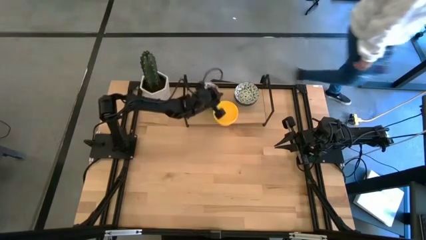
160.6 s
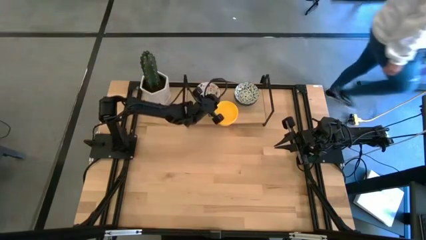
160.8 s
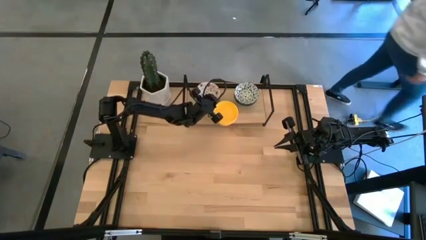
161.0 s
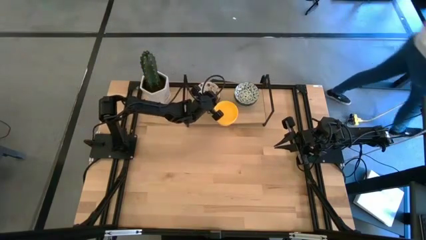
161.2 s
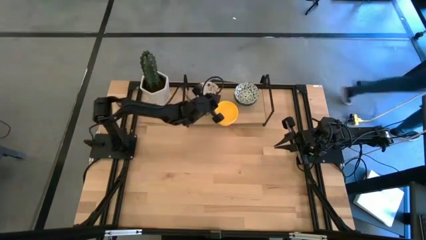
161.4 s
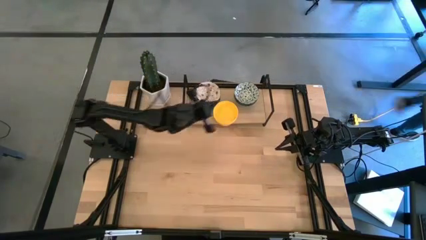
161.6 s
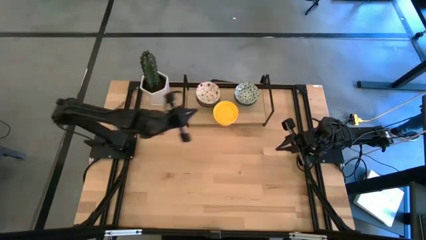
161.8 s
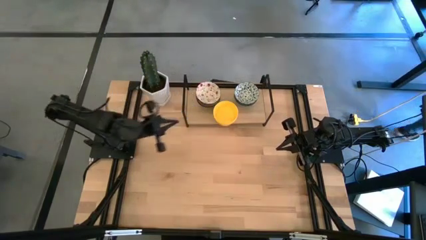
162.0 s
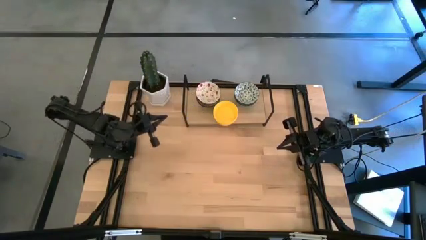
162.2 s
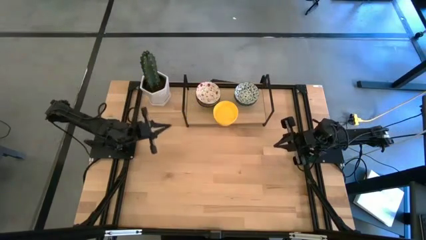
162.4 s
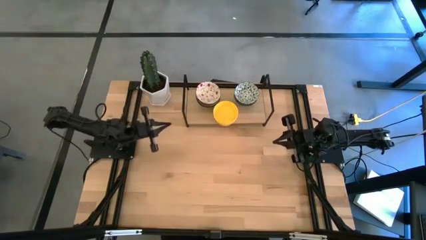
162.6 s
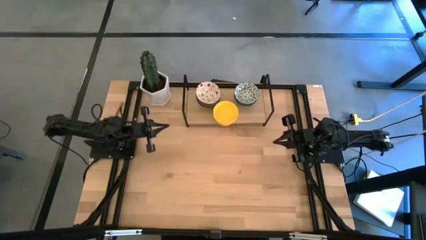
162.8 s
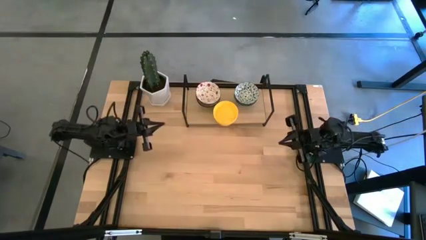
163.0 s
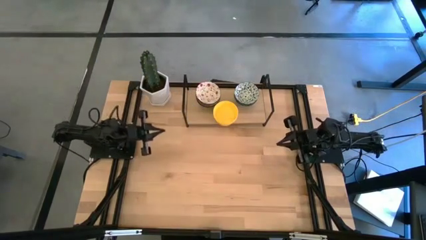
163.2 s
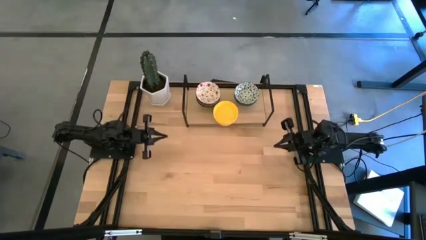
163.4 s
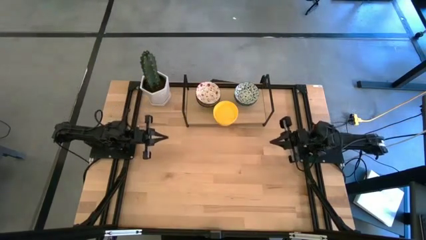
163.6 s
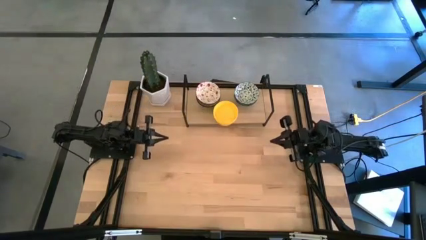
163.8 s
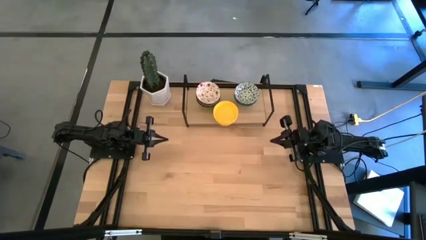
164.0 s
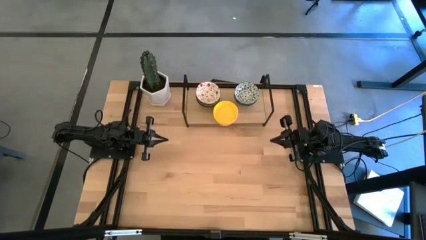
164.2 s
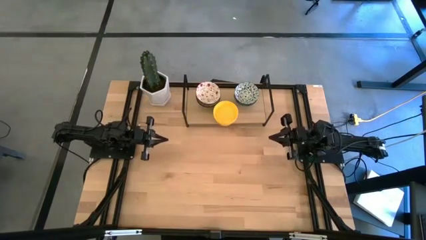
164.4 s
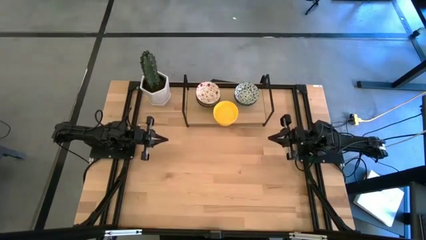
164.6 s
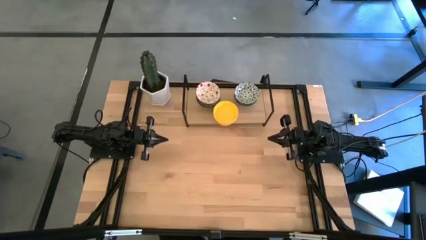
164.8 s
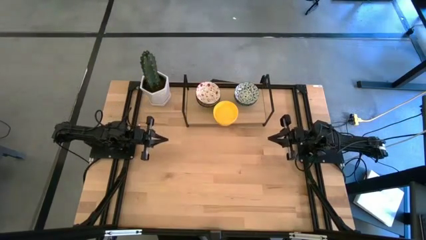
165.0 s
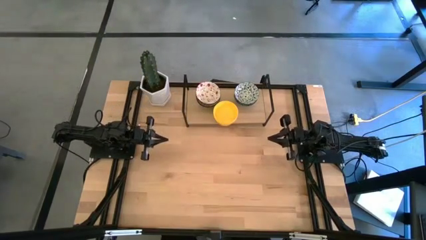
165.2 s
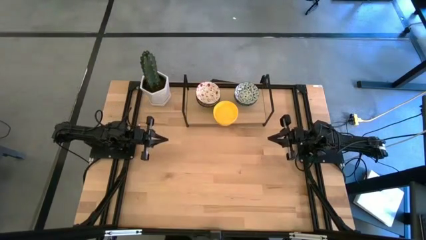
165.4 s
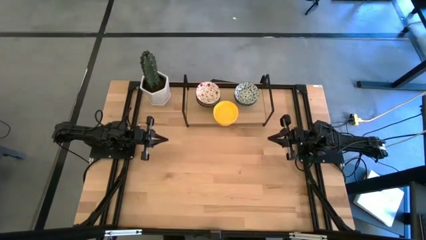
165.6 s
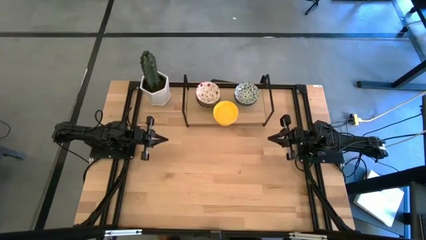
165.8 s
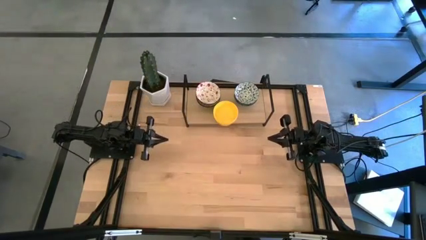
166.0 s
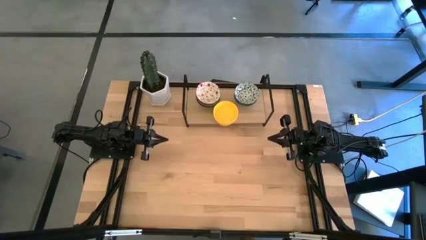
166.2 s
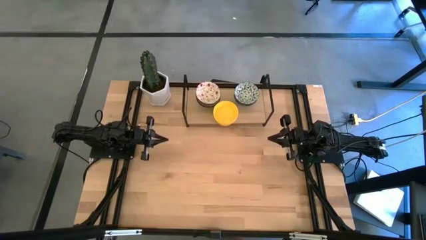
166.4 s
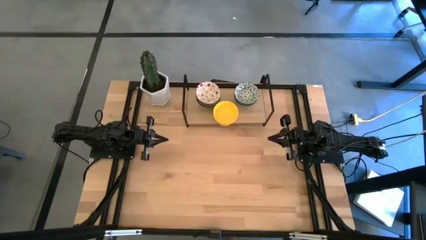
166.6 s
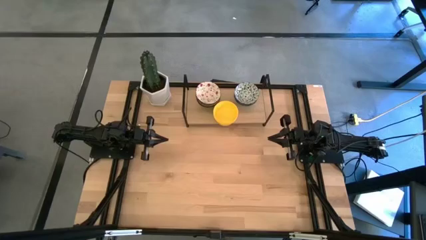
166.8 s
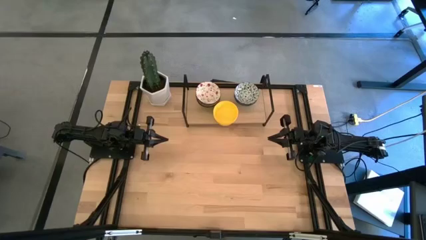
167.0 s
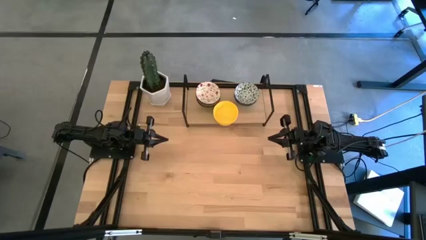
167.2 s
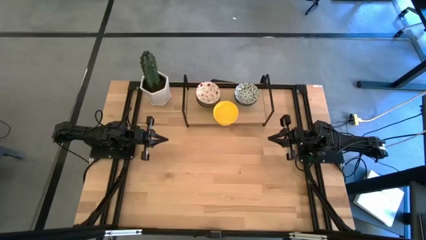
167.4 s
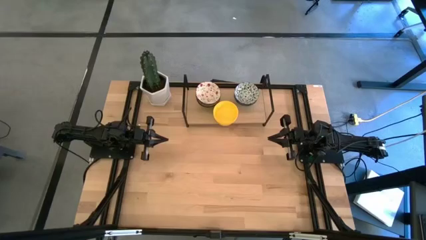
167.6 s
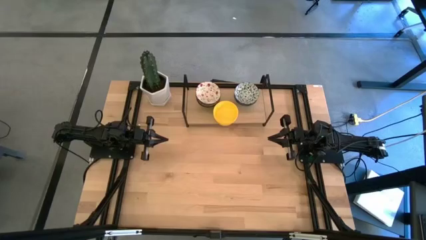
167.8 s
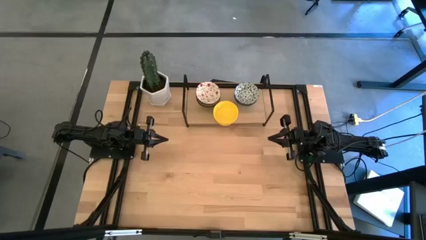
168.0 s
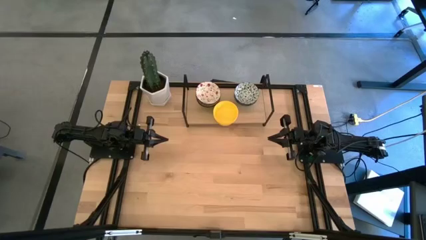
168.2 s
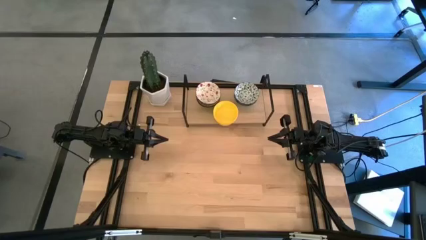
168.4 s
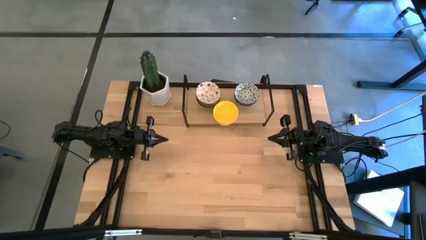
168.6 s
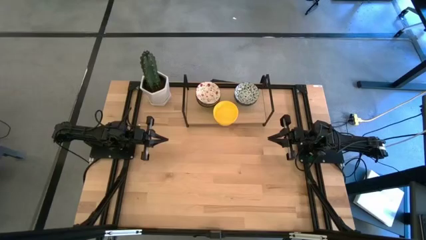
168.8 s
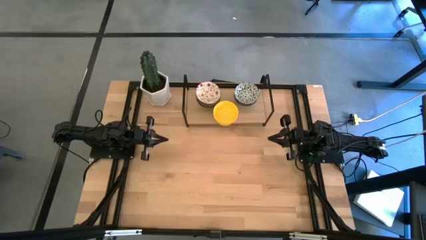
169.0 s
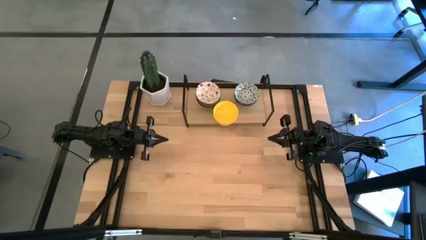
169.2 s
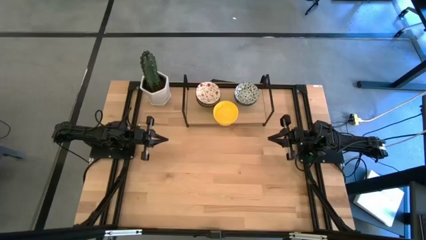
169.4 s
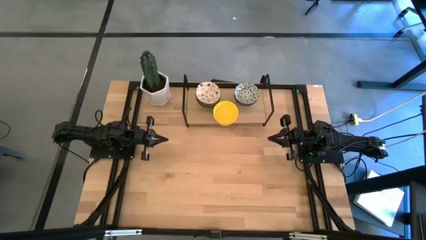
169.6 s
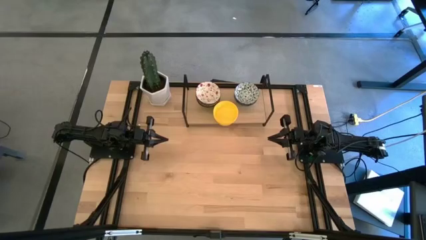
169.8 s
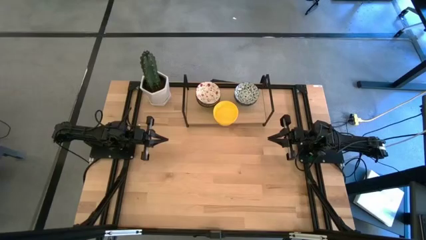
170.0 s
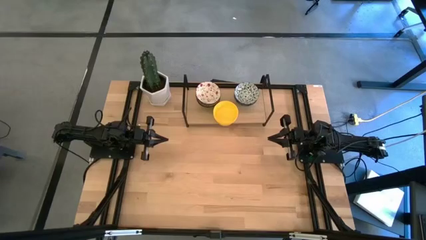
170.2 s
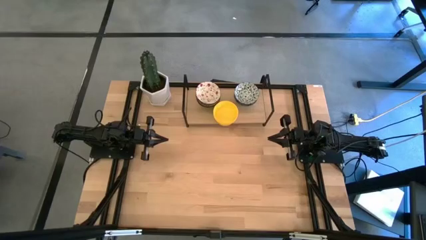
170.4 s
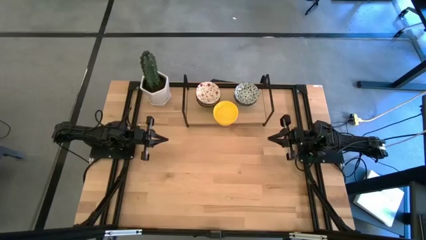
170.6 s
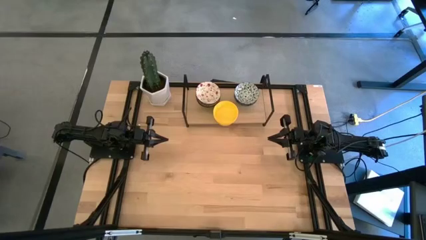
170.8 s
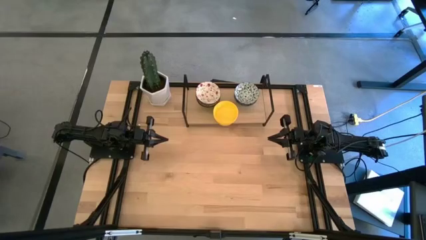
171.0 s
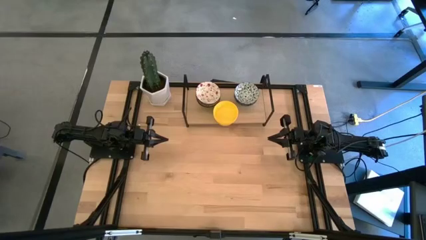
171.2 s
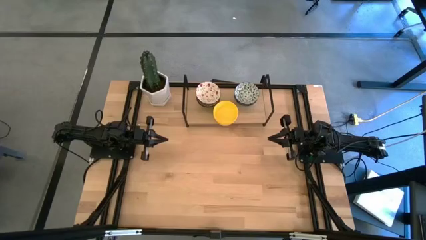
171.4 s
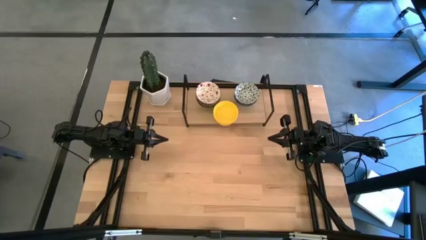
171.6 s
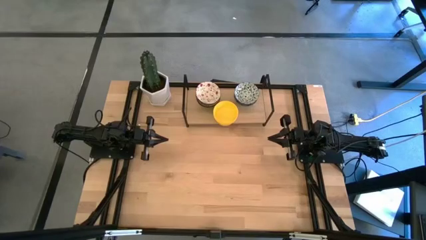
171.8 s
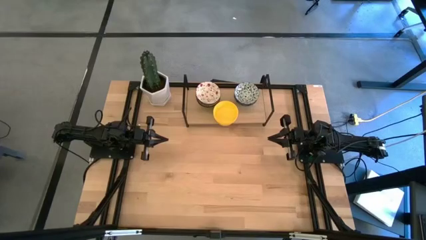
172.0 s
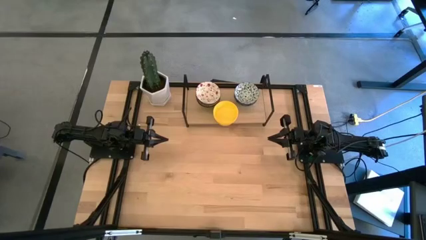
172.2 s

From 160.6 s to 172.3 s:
Task: Pick & Place Mini bowls
Return to Home Position

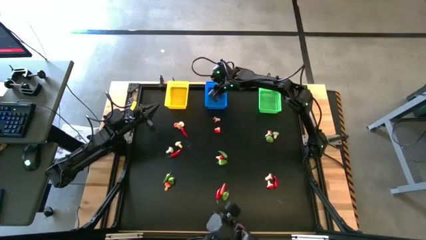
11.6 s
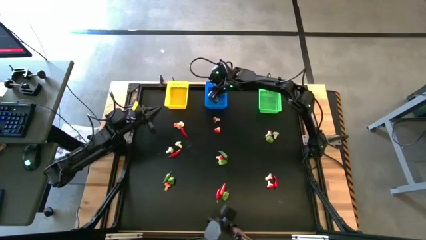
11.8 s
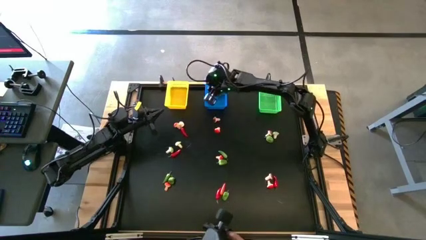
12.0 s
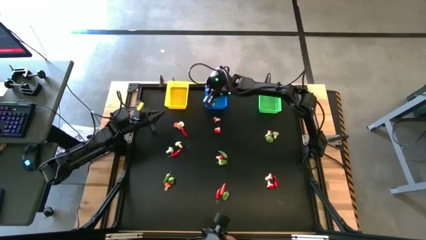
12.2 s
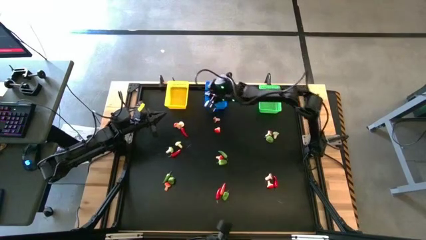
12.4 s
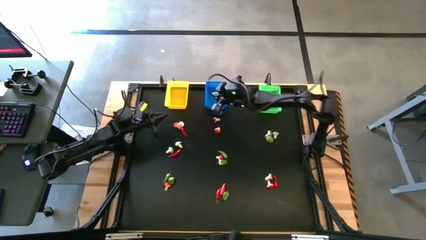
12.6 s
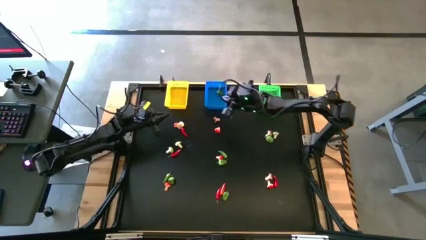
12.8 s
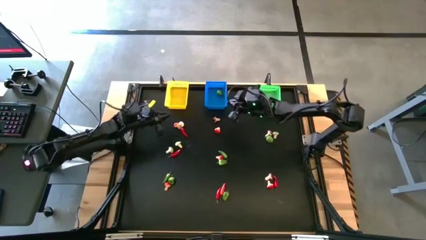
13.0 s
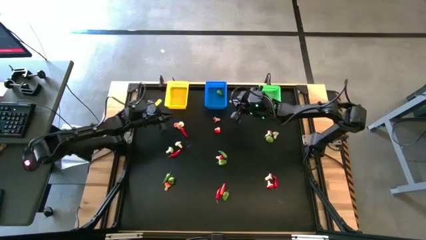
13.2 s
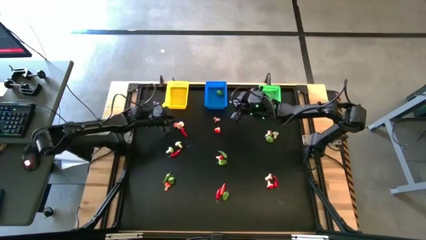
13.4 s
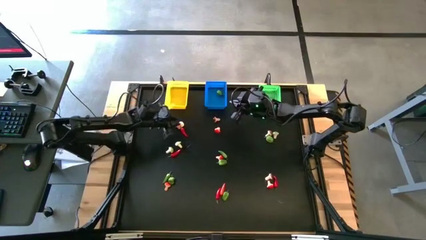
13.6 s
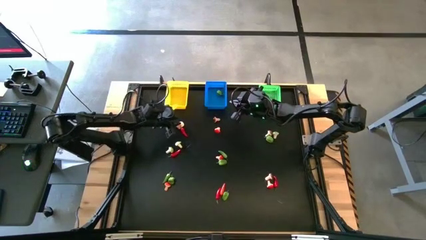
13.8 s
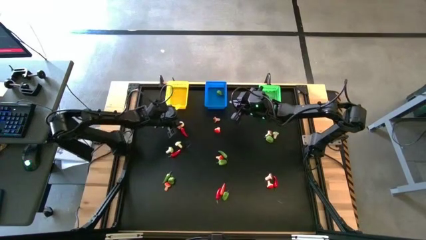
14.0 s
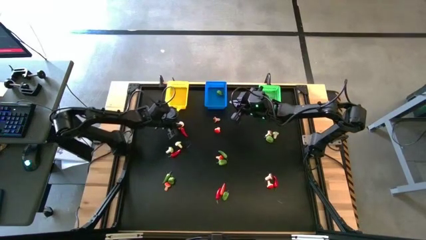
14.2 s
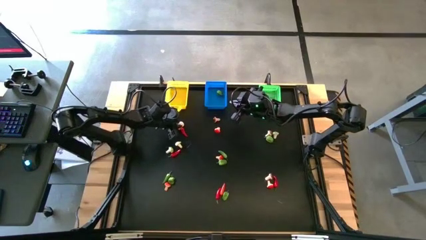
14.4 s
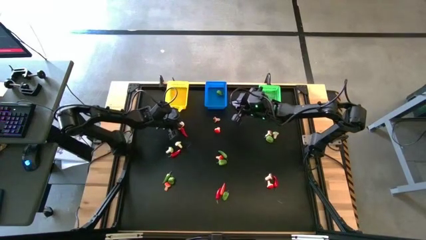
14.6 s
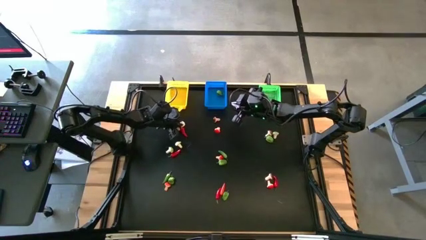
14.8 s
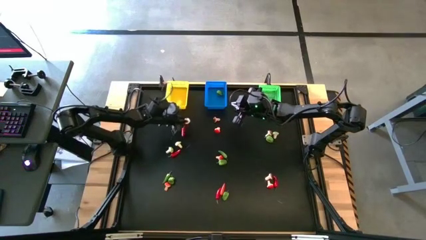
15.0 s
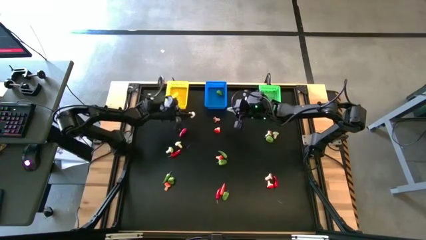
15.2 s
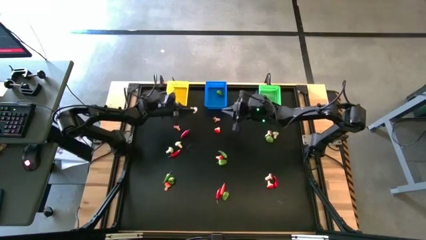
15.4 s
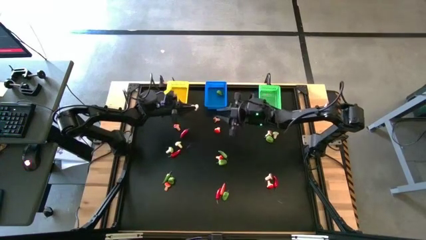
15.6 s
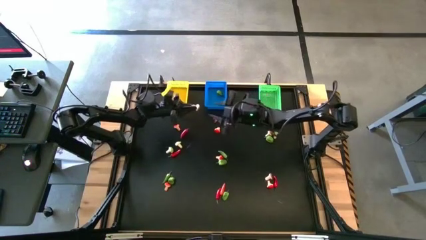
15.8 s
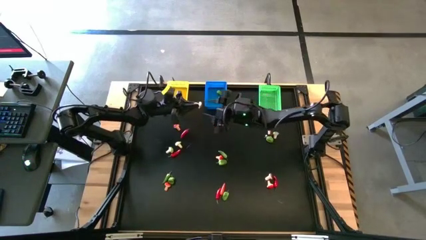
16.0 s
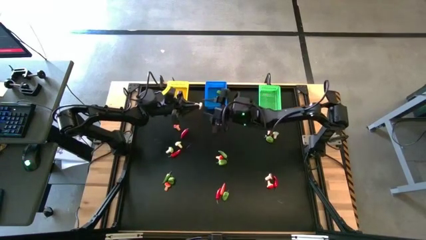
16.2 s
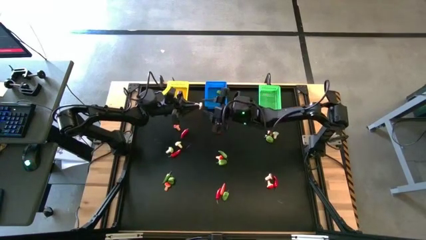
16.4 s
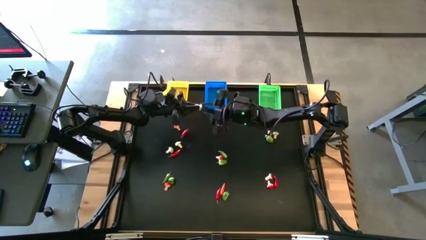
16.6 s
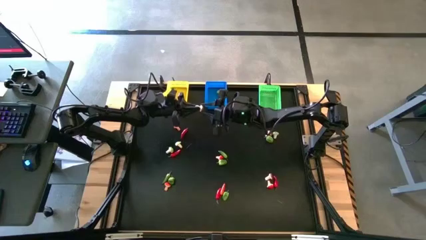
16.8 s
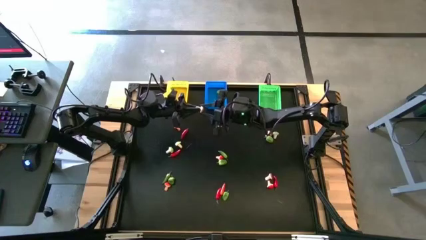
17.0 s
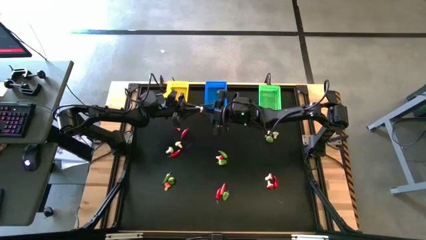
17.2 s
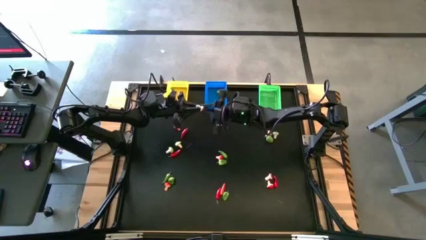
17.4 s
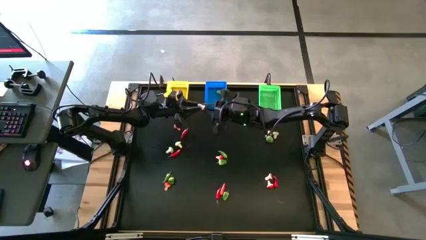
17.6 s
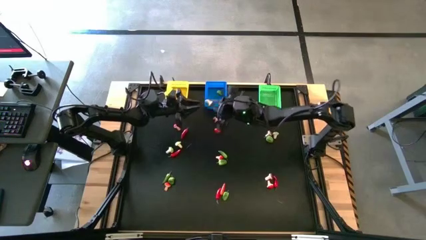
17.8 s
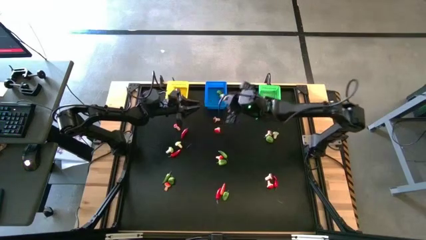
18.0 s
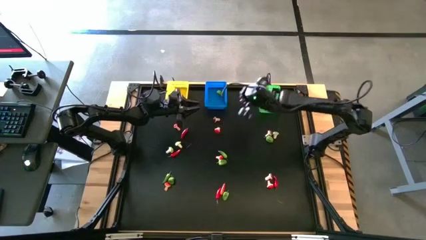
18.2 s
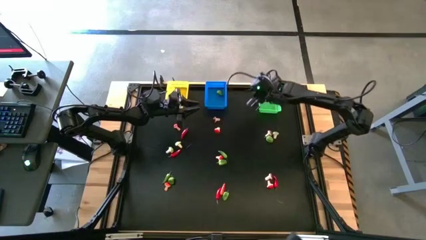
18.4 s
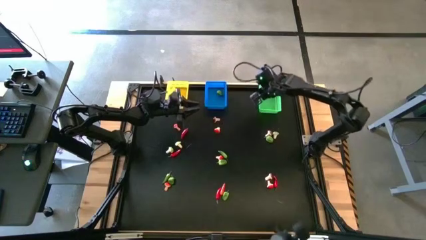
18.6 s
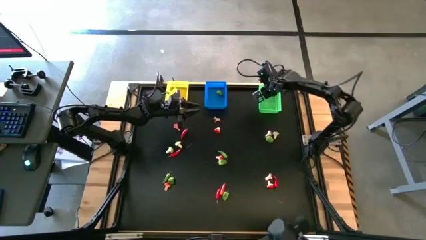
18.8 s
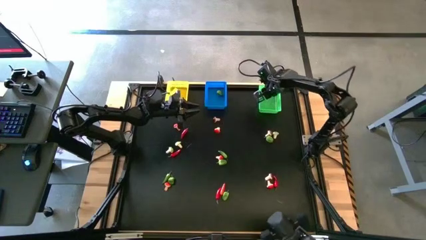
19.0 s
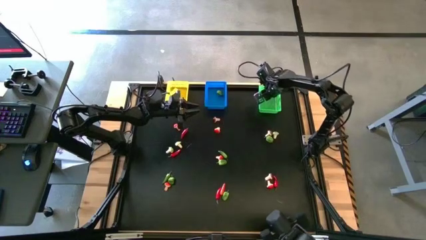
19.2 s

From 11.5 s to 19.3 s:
Task: Sort produce into baskets
Put the brown mushroom into the green bin
